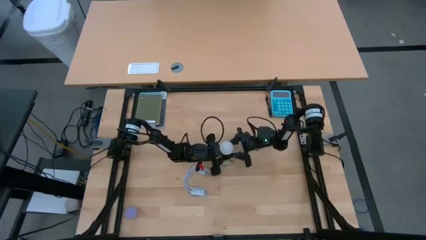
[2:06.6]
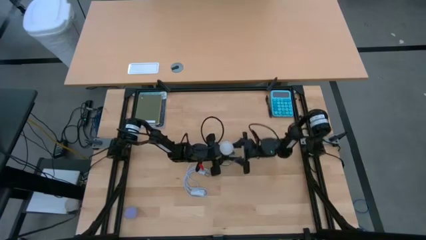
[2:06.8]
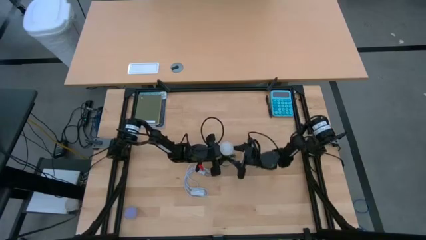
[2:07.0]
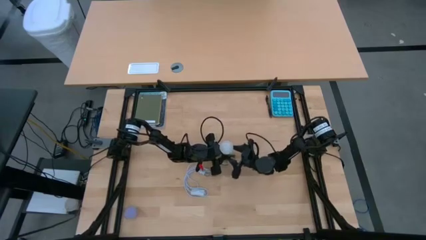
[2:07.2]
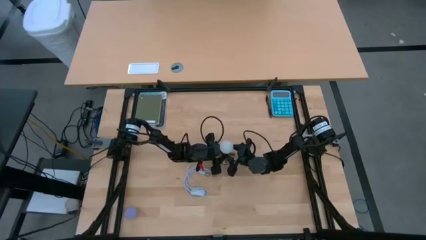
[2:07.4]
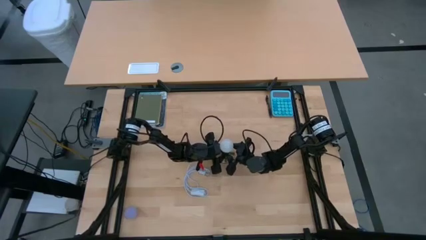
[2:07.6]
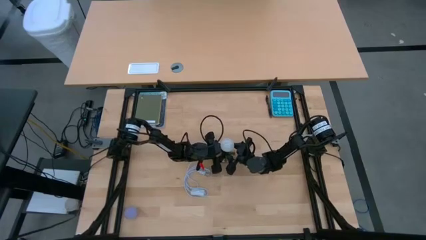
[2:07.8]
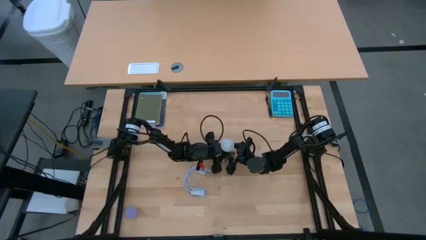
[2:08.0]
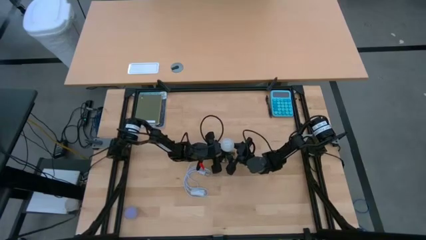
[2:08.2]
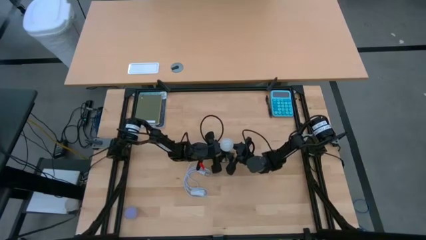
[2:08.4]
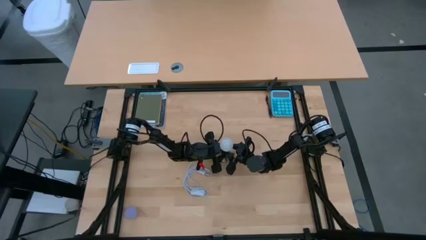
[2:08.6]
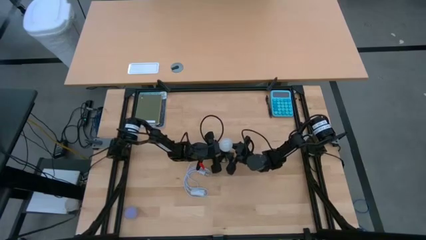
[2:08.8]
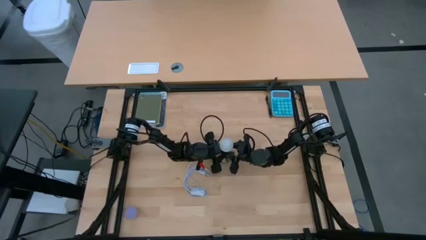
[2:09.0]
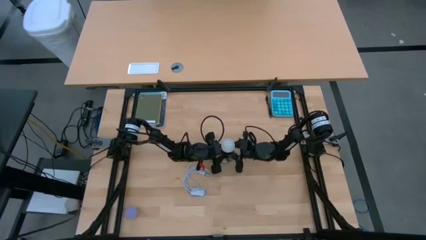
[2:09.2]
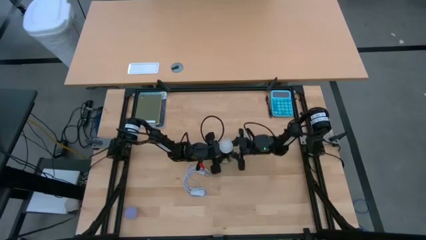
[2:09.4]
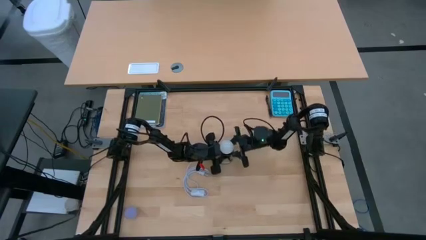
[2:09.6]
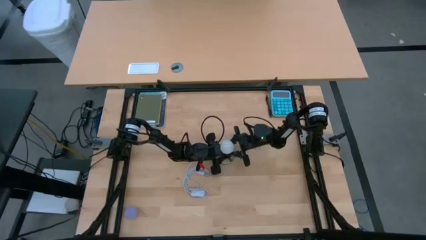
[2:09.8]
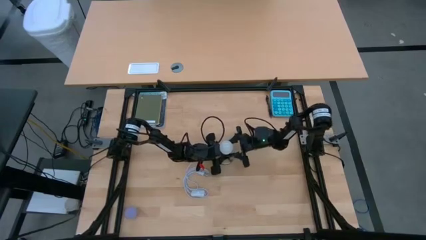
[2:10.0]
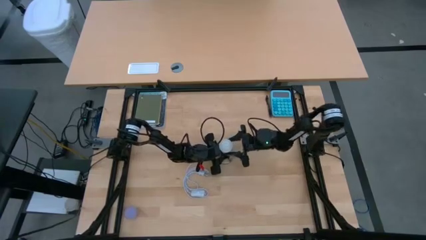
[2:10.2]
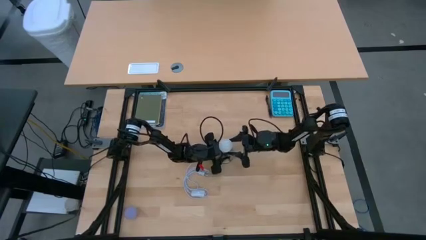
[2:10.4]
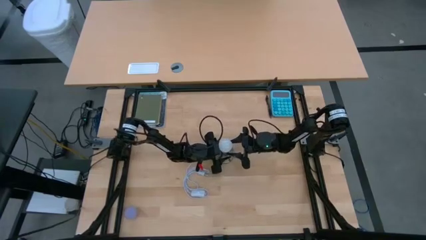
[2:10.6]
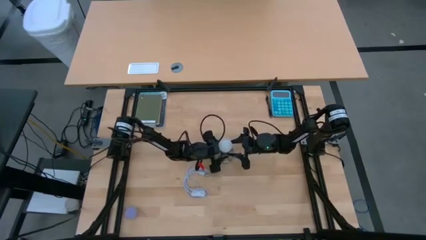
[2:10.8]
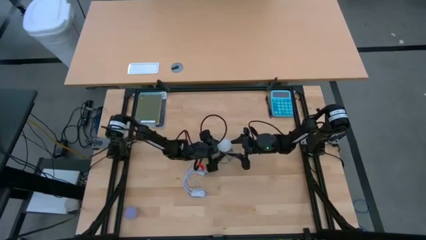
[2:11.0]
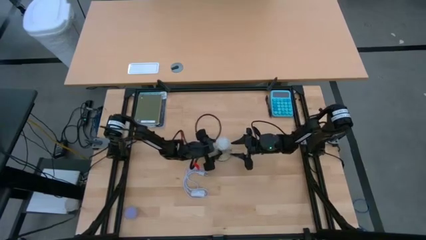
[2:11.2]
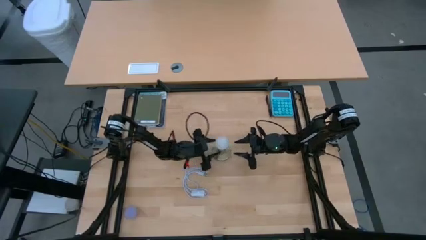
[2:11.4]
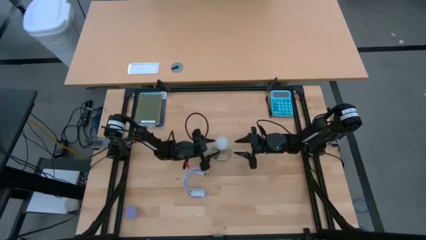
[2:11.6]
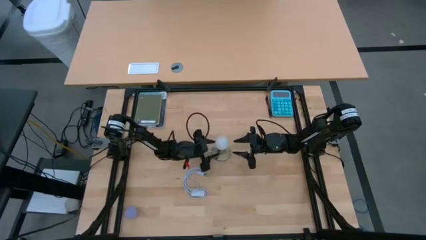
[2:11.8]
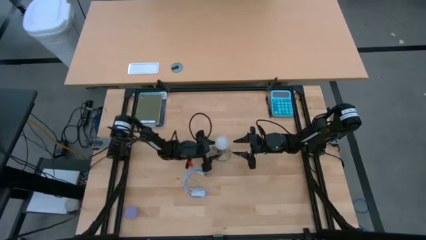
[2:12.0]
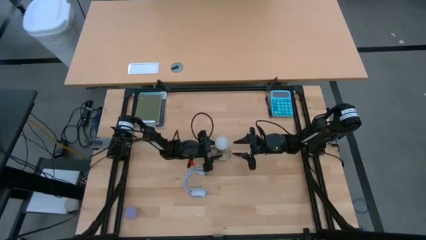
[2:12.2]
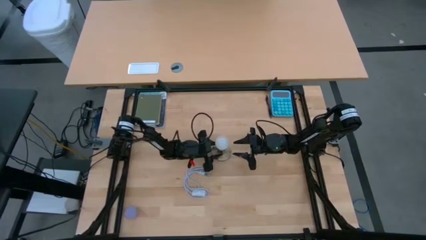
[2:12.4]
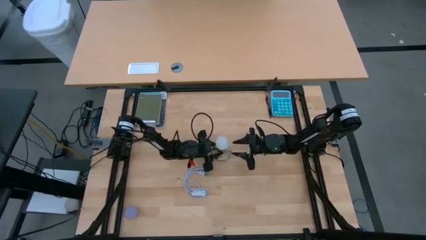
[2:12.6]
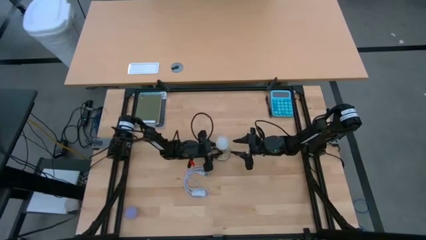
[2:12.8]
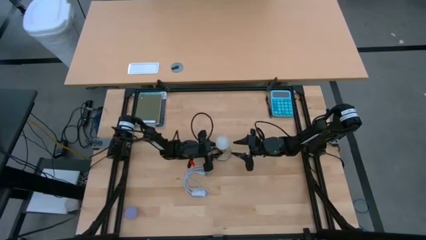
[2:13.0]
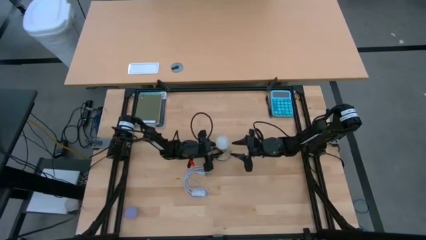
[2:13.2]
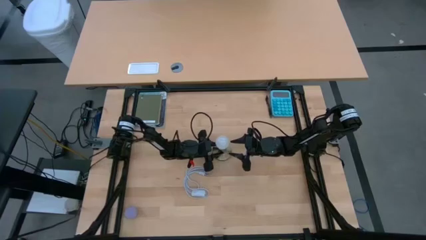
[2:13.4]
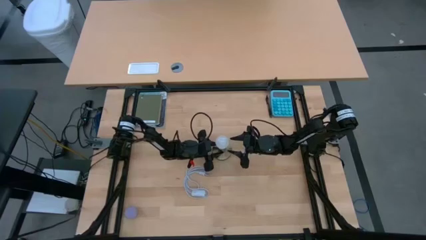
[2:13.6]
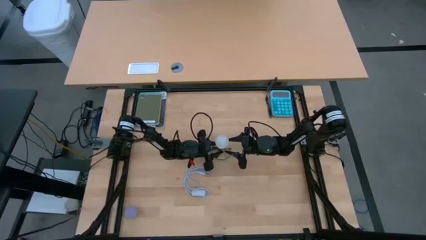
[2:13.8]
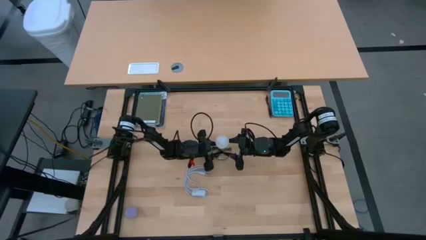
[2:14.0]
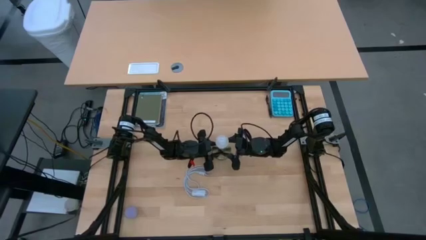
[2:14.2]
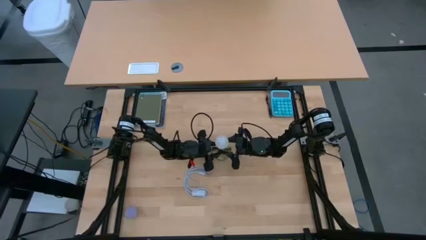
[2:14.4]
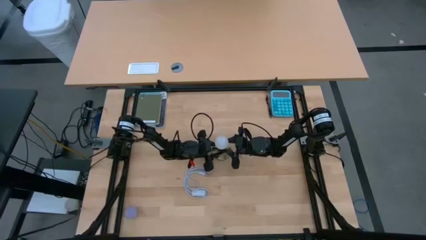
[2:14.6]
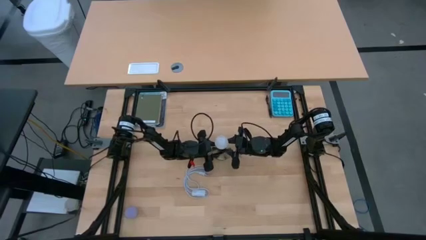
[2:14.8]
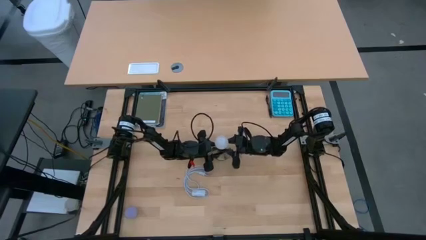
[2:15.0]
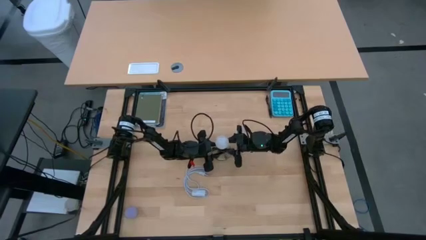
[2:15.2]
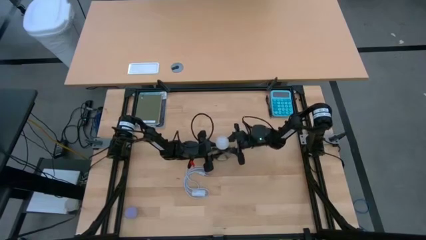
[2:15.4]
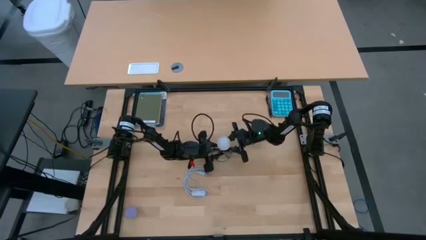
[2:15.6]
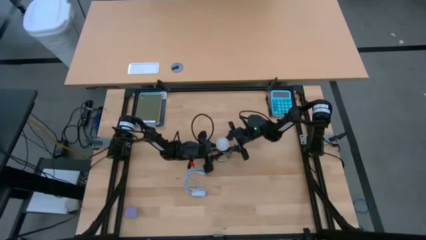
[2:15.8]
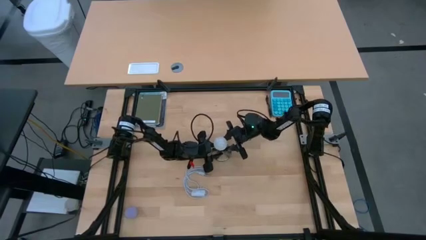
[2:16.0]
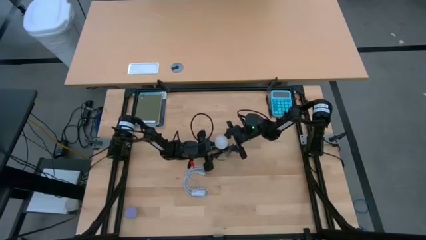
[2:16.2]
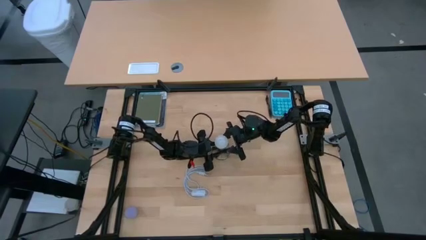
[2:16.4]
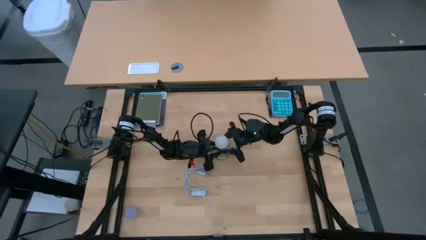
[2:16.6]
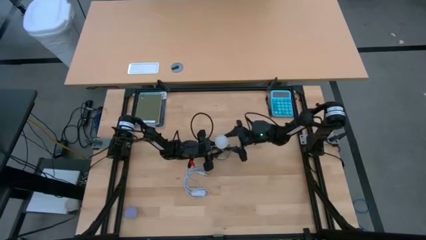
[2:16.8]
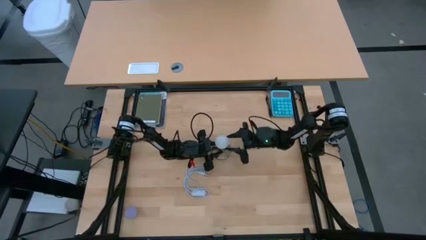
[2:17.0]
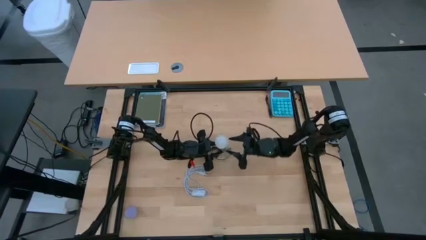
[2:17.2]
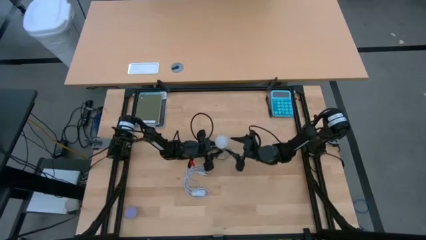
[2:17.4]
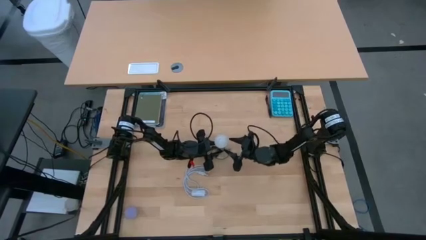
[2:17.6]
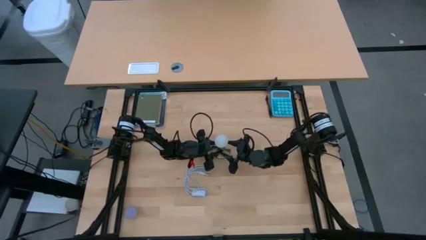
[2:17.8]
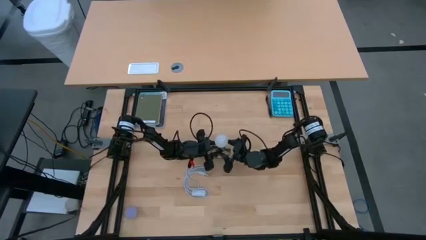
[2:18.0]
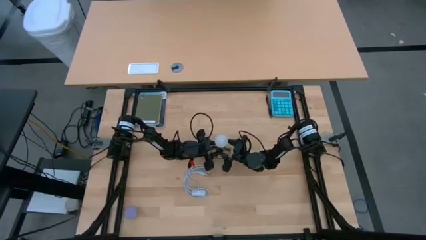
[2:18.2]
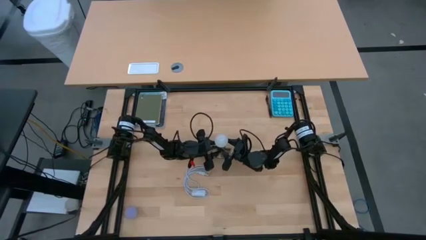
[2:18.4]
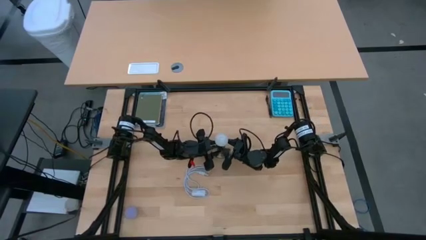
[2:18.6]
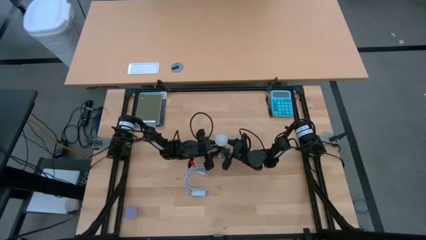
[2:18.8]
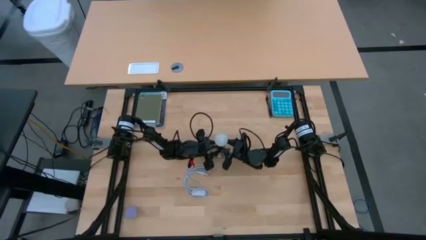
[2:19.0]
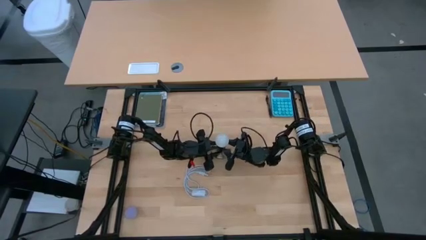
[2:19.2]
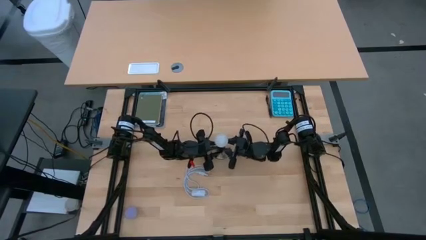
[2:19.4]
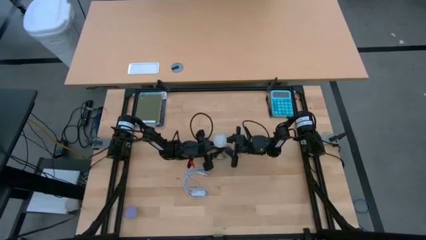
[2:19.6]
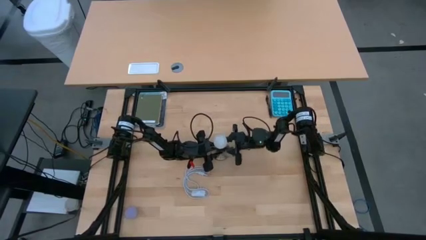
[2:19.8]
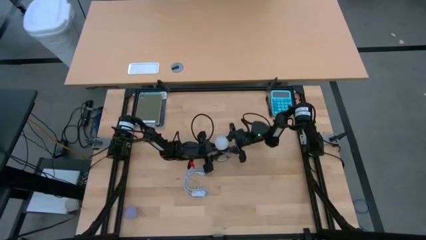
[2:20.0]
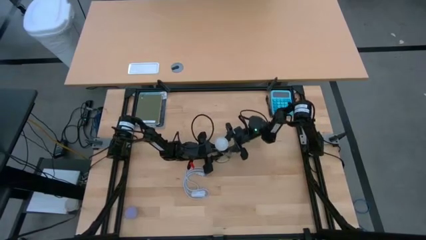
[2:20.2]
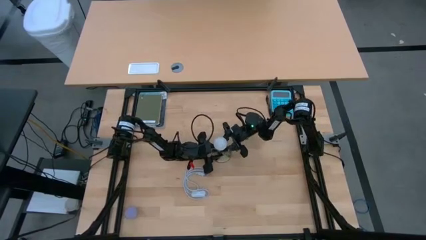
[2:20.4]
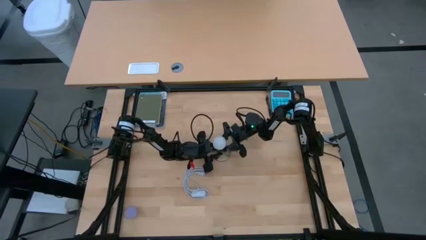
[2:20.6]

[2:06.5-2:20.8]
Task: Screw lightbulb
Remove the white lightbulb from the silver lamp

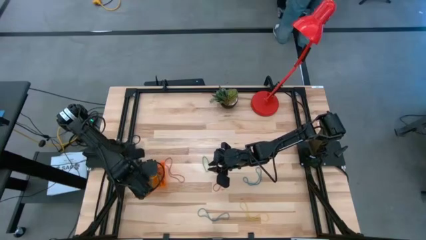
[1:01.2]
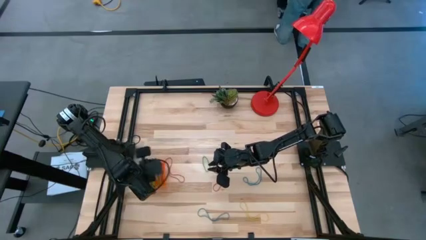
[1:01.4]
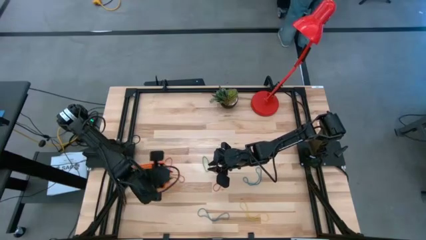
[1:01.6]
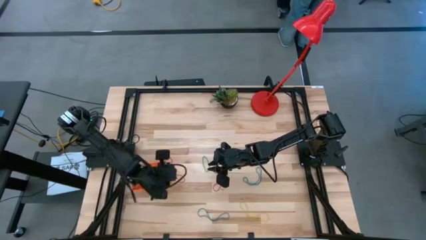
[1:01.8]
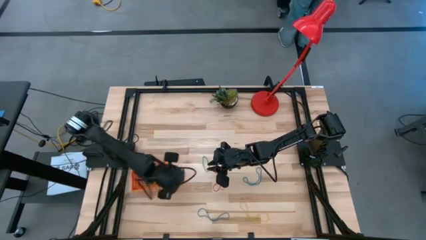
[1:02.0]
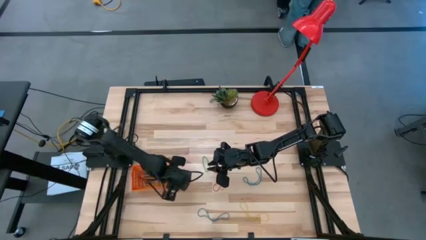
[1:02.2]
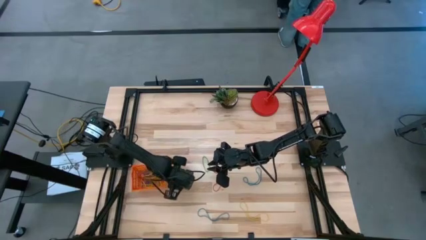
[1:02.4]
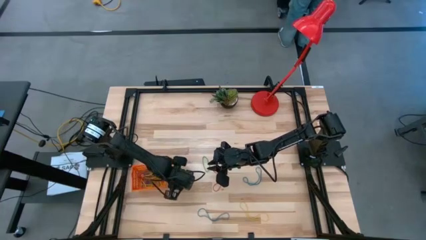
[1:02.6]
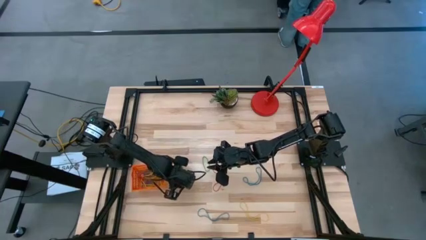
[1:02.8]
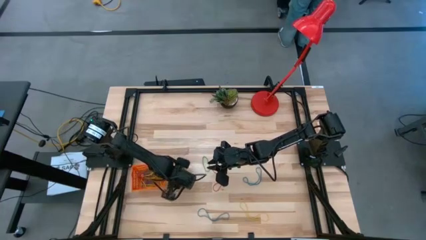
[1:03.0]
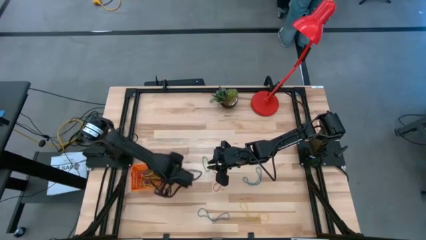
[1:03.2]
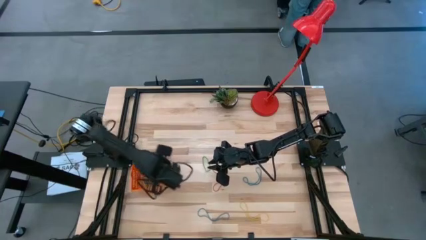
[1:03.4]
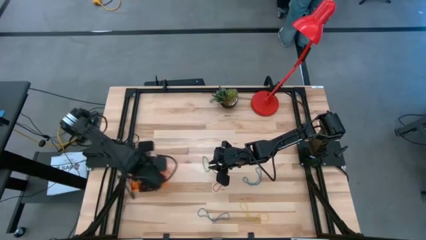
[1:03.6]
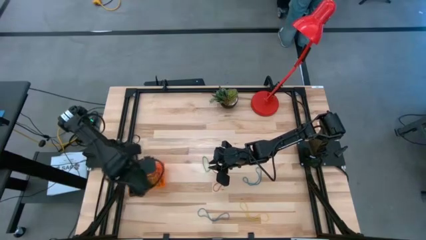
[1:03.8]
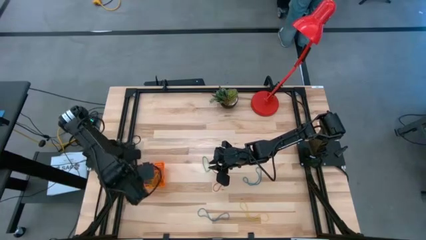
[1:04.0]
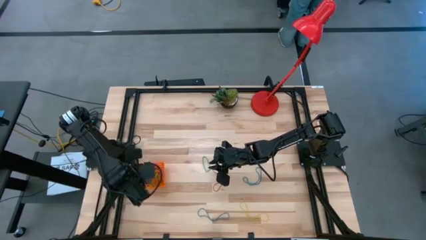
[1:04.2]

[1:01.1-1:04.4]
Task: Pick and place rubber bands into bin
Put the red rubber band into the orange basket
